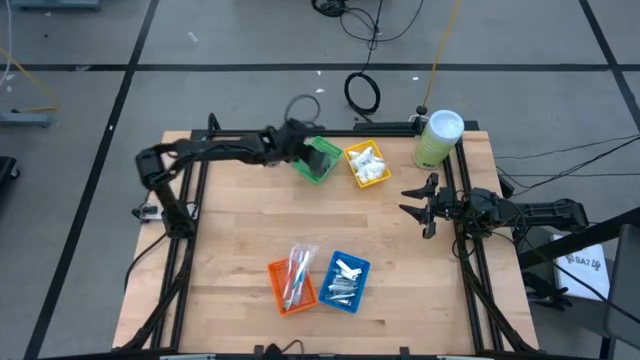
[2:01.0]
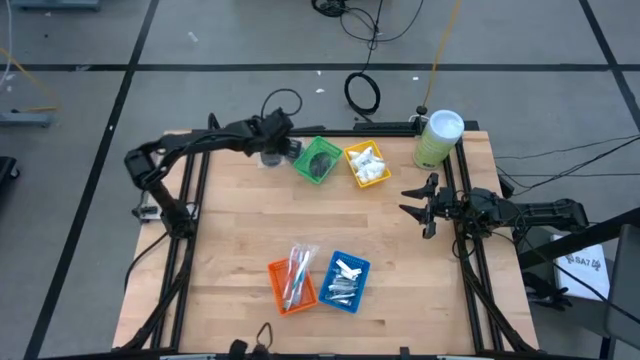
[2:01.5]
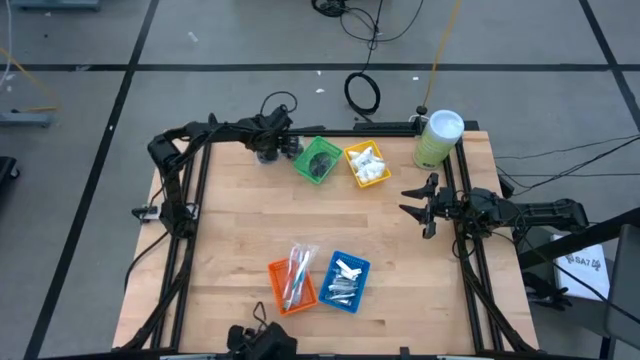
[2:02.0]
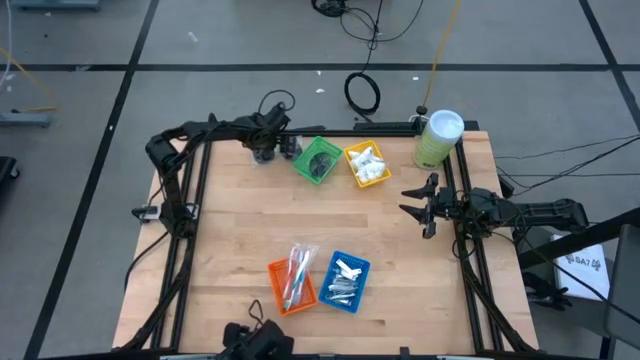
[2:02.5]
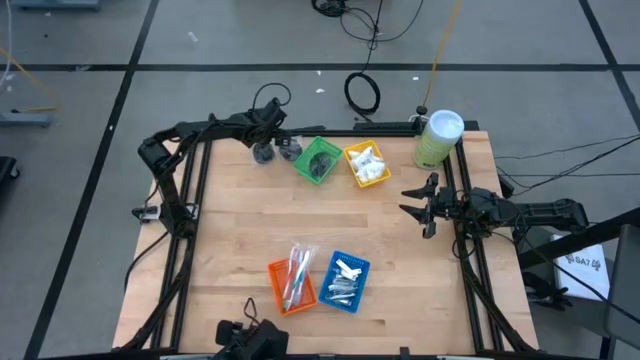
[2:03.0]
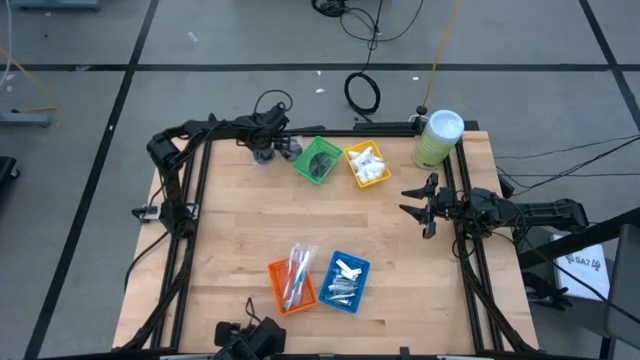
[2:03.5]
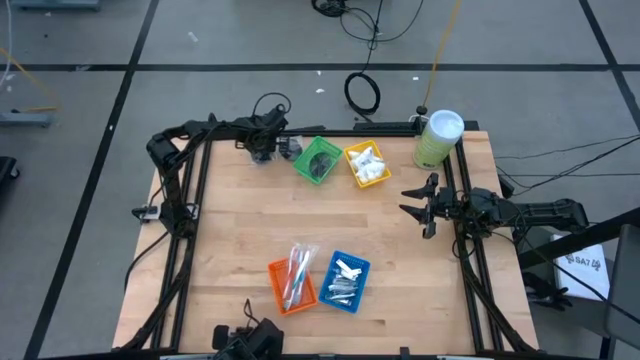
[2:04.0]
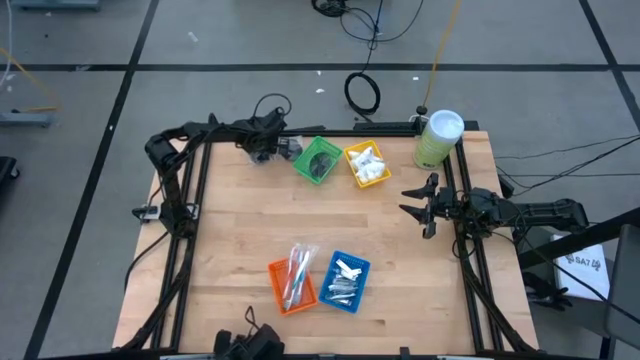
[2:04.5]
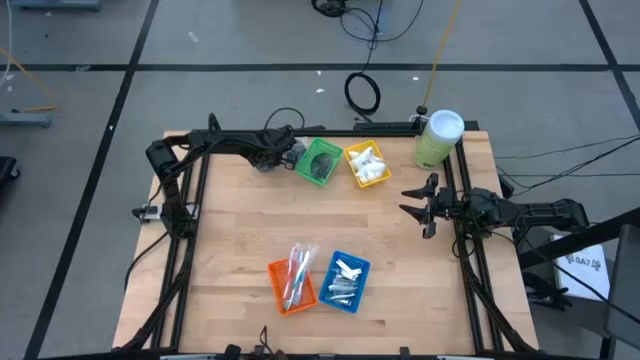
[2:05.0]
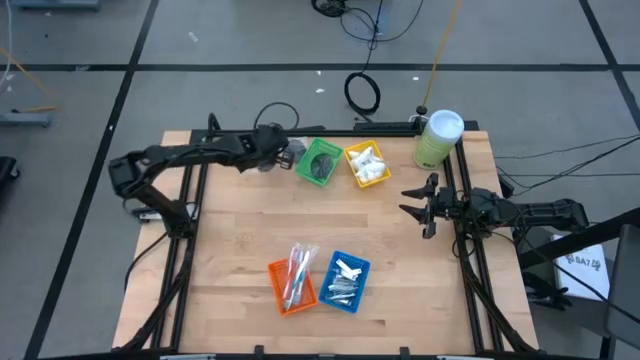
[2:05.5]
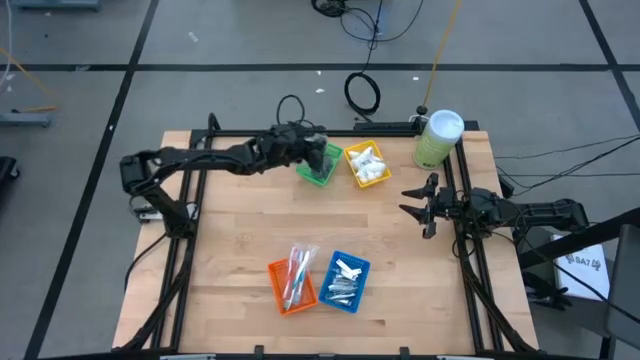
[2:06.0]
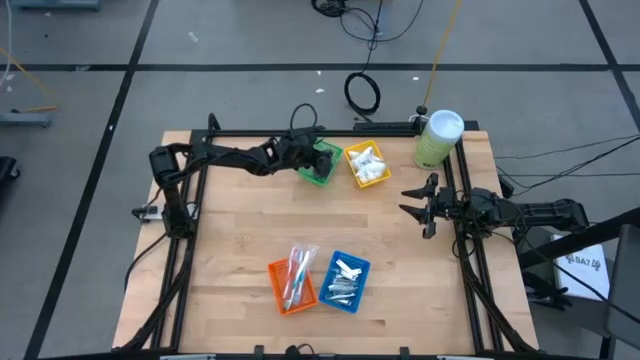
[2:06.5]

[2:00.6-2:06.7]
Task: Pick & Place Travel size toiletries
Put the black hairbrush into the green bin

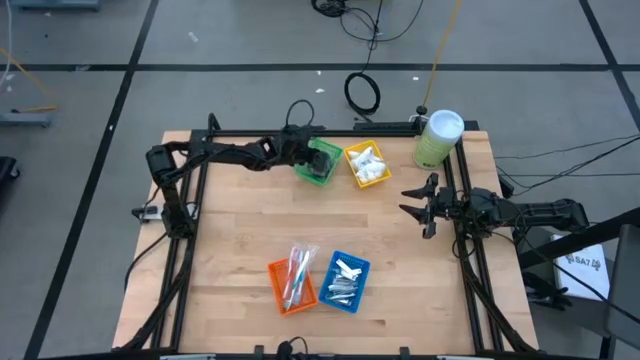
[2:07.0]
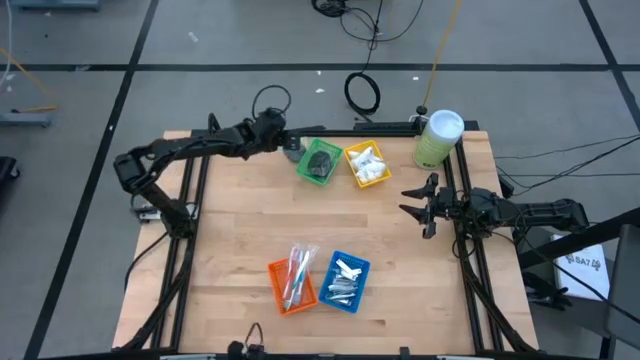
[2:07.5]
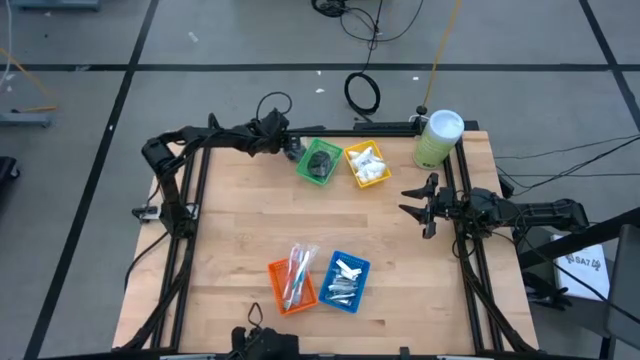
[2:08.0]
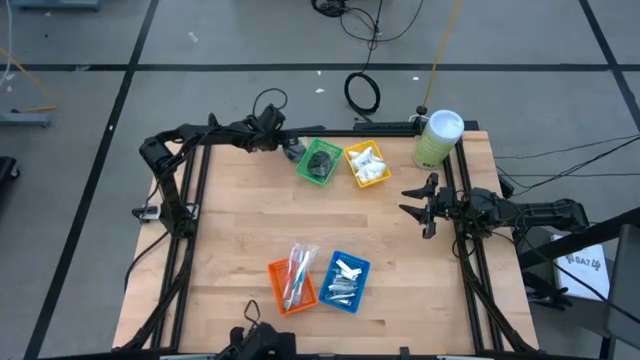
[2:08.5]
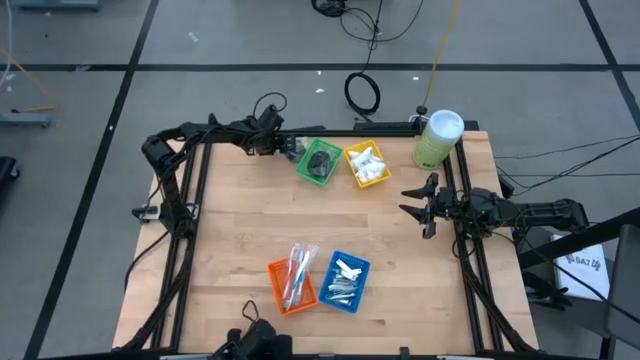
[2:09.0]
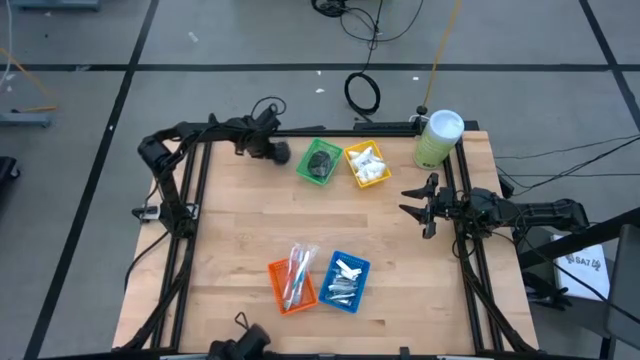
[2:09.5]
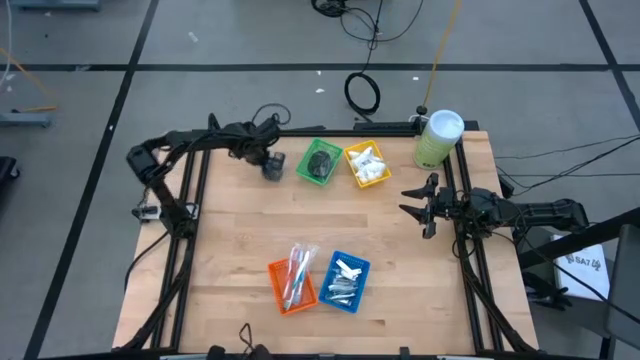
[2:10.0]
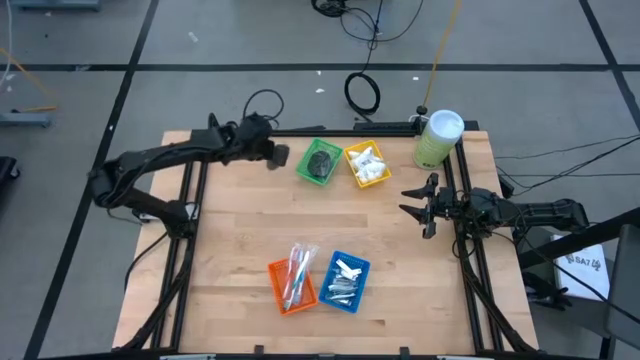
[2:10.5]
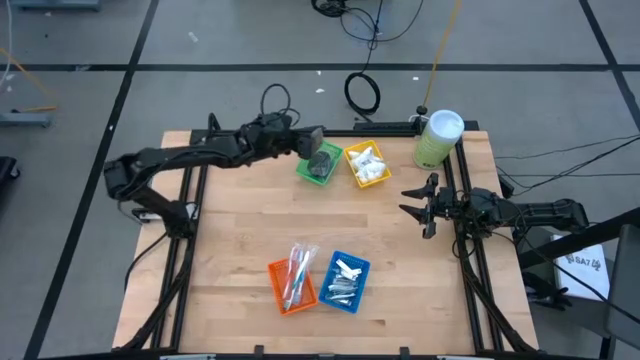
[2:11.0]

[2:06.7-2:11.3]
Put the black hairbrush into the green bin

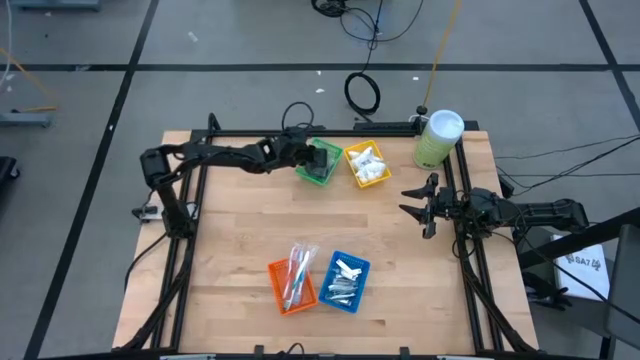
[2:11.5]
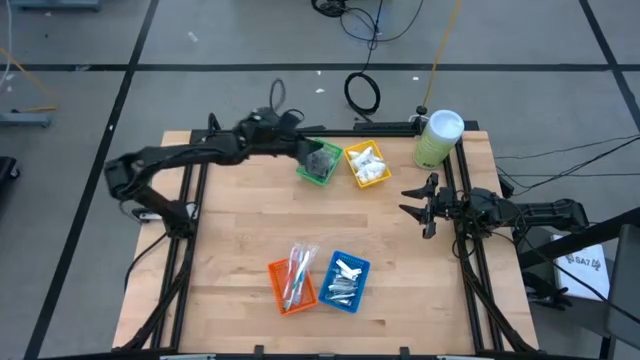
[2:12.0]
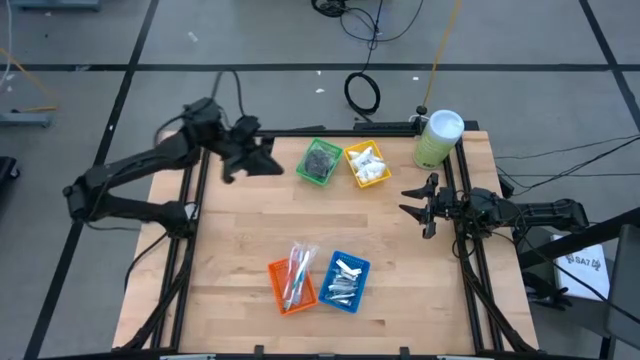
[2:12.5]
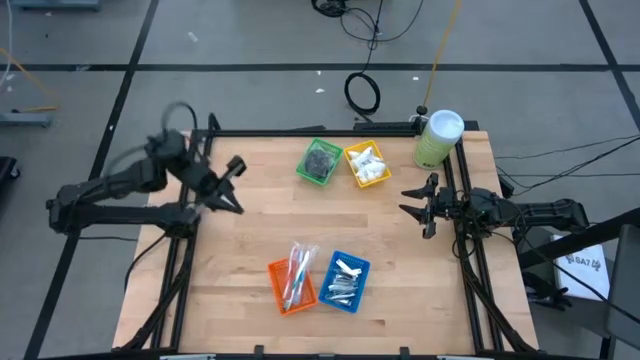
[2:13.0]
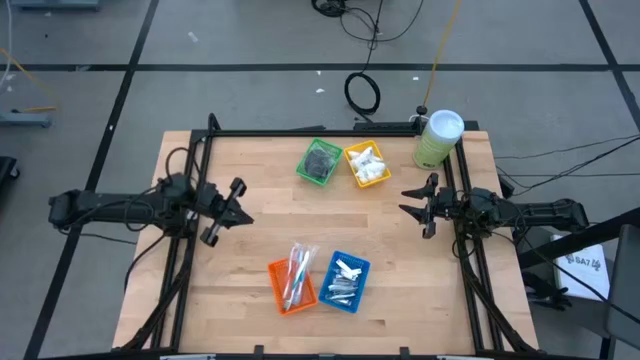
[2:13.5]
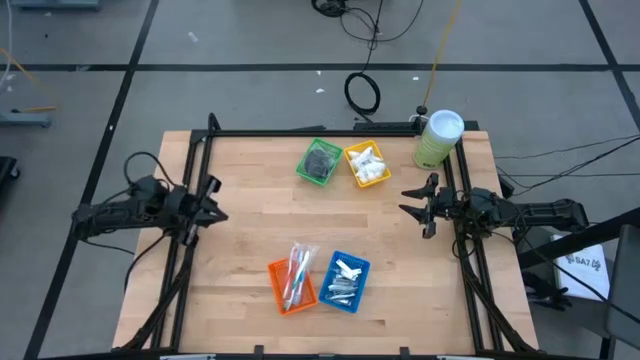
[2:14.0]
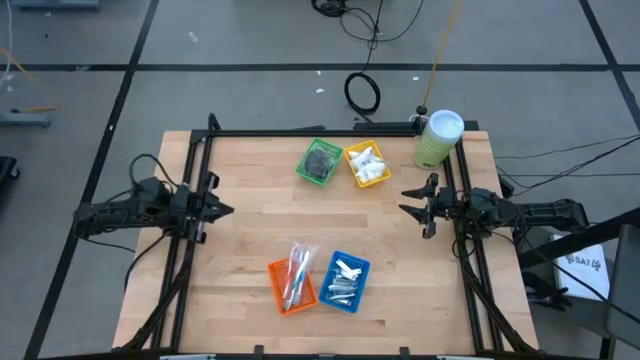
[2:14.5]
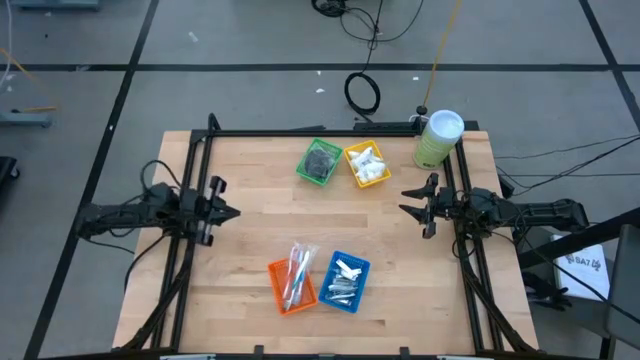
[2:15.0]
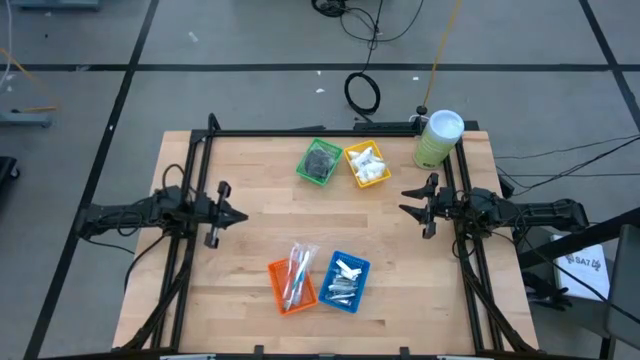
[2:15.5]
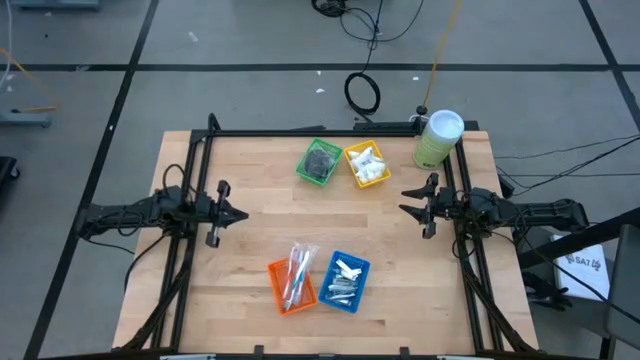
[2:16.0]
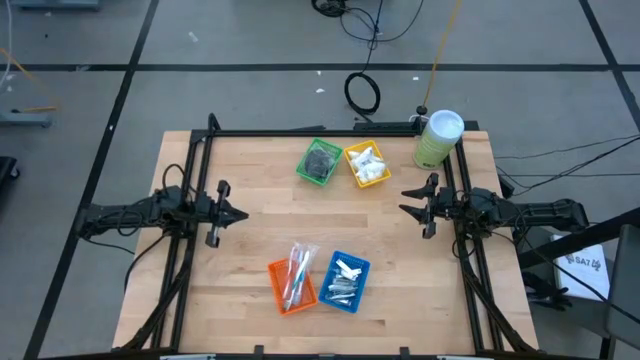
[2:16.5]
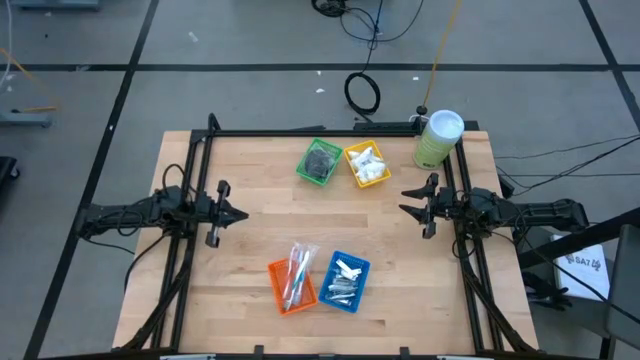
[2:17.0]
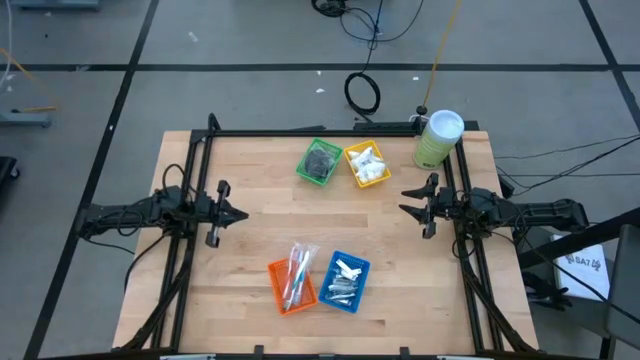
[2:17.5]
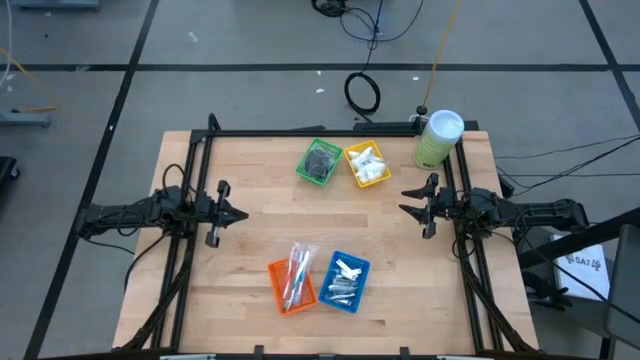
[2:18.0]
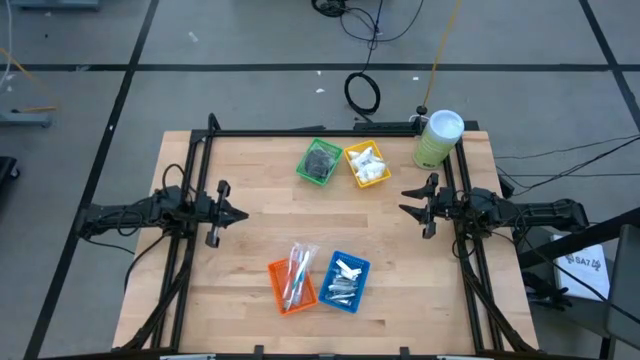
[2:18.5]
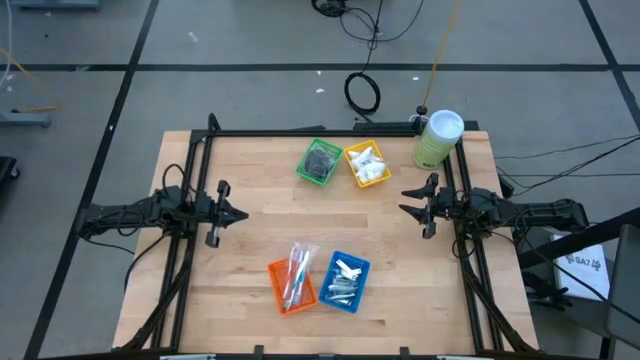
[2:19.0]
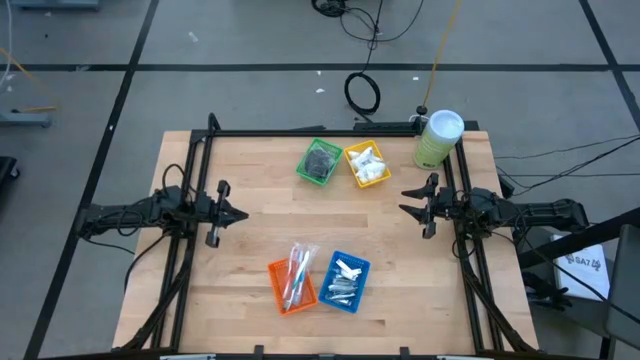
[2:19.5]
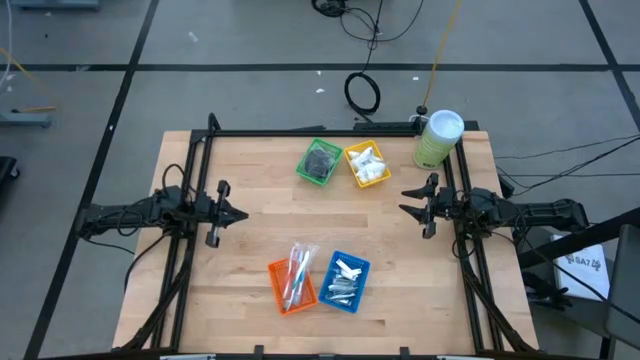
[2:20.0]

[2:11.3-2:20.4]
Return to Home Position

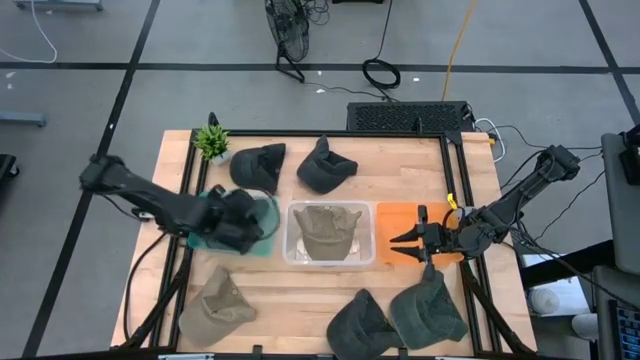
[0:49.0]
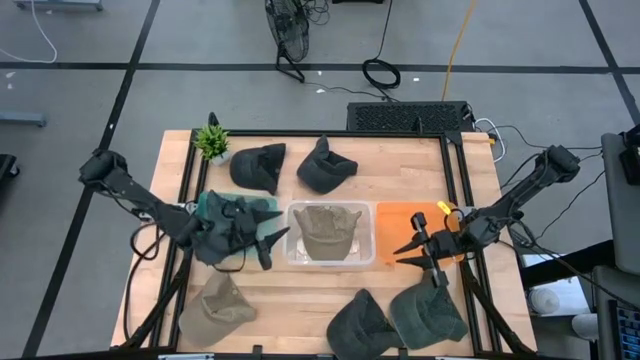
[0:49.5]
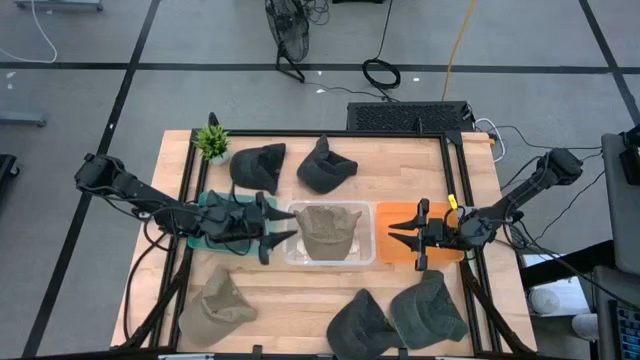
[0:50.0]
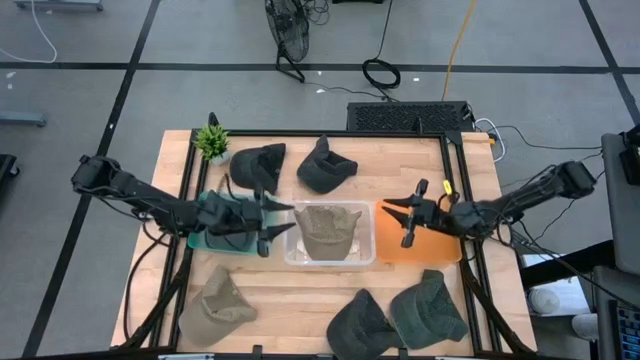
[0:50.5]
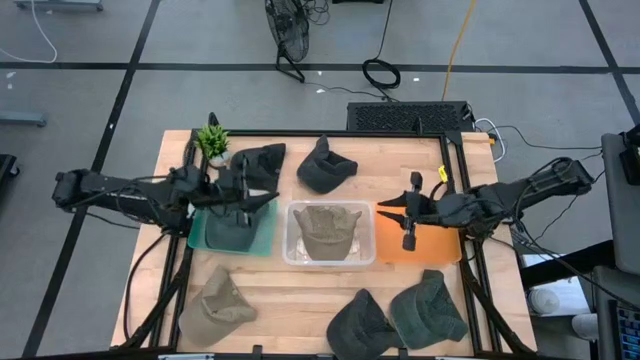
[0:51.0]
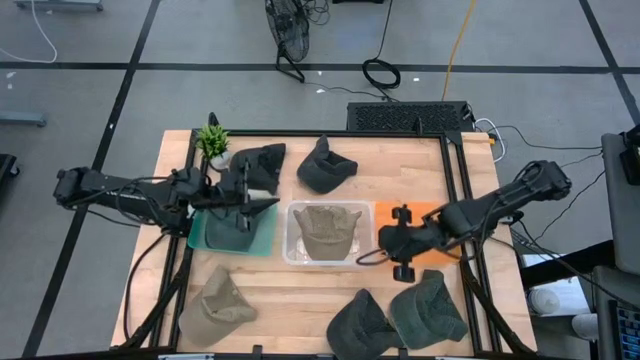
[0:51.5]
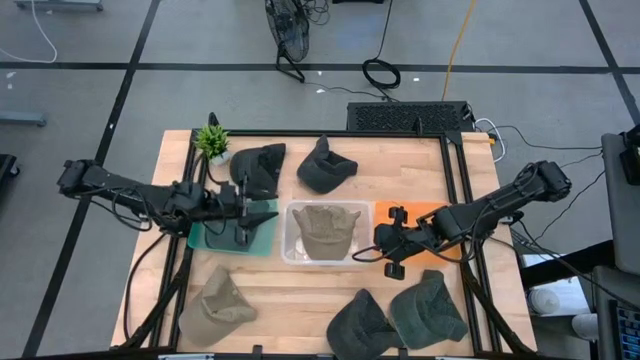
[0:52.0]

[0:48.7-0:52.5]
Task: Pick & Place hat
Adjust the transparent bin
